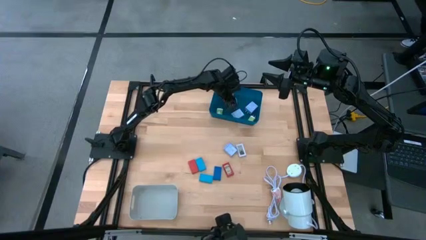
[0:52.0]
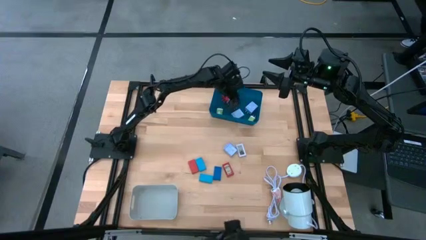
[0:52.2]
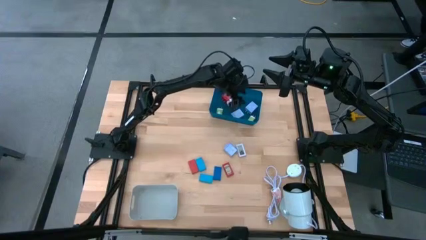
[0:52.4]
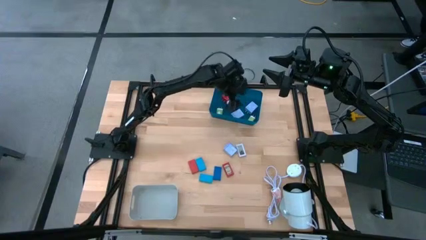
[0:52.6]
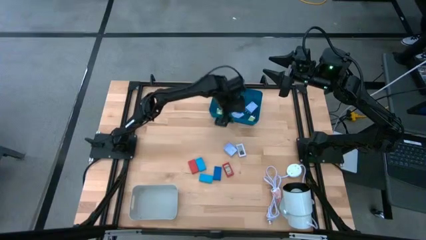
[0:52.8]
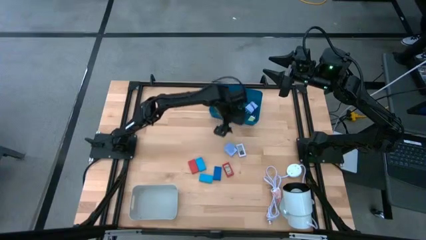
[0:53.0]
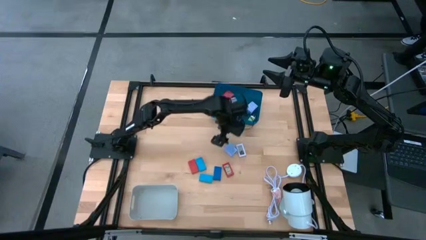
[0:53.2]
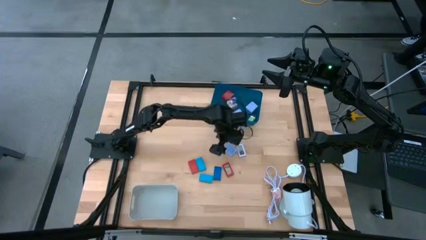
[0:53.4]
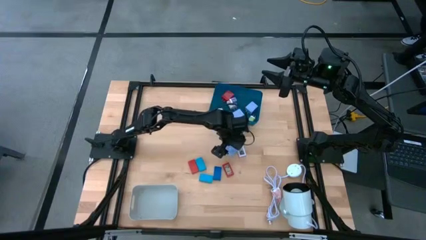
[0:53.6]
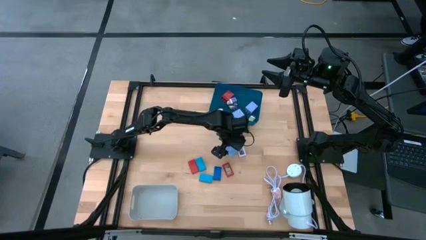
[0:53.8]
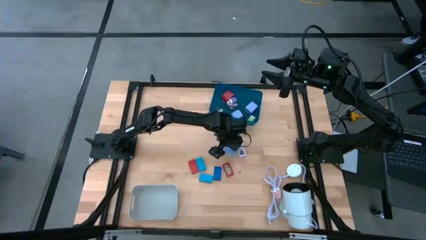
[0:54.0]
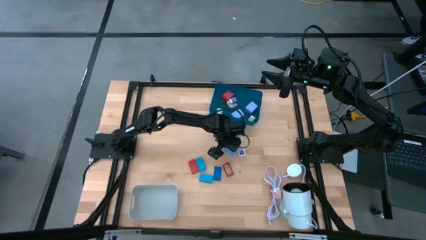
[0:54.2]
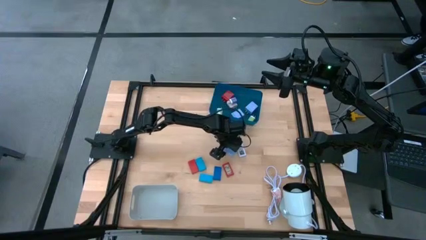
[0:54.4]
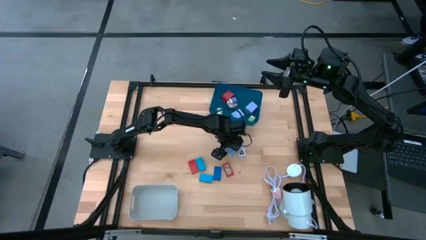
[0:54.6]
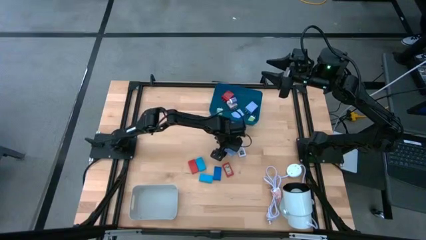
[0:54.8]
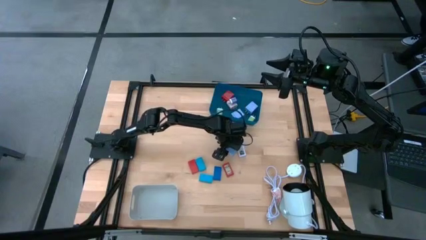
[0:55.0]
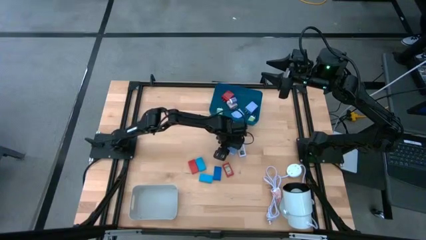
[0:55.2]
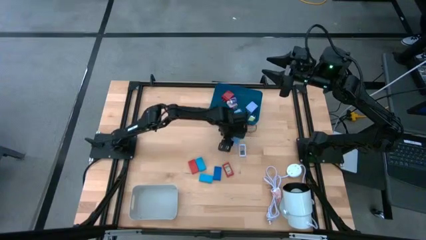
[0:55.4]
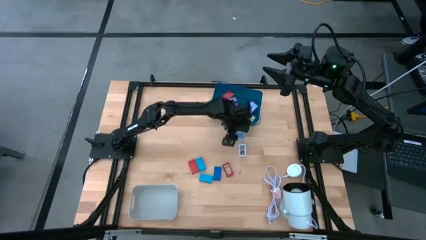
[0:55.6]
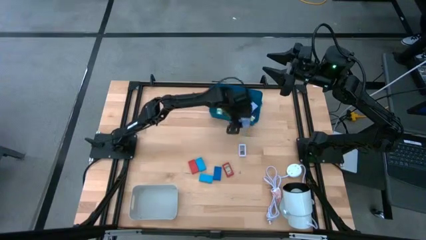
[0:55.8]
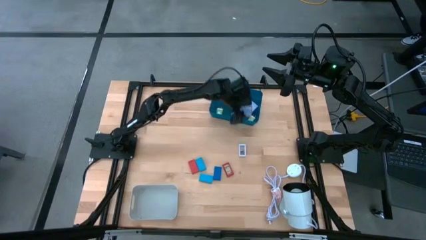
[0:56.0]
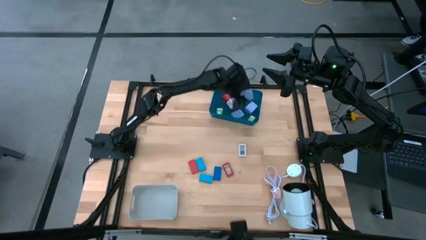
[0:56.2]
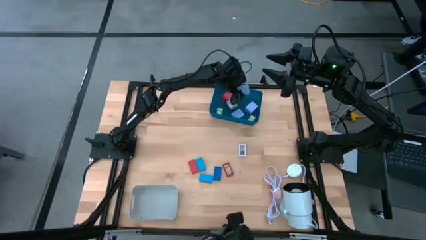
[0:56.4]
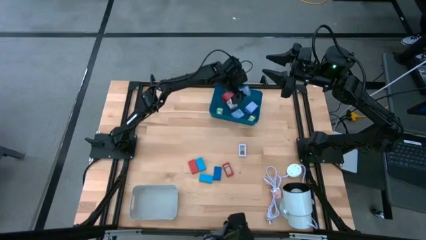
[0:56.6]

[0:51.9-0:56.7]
Task: Pick & Place Office items
Put the light blue charger adapter into the blue bin

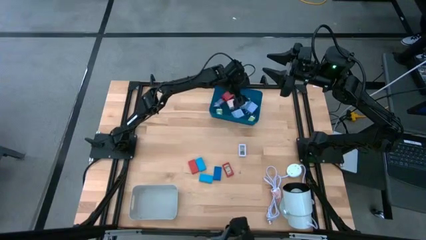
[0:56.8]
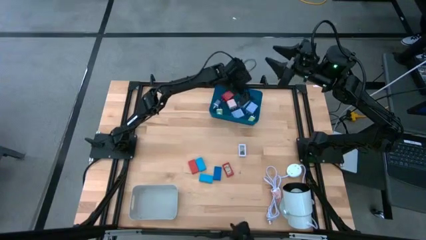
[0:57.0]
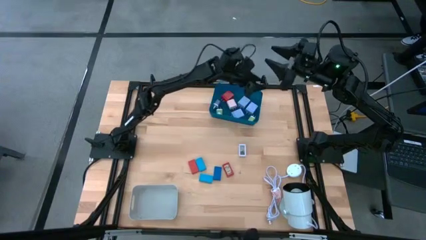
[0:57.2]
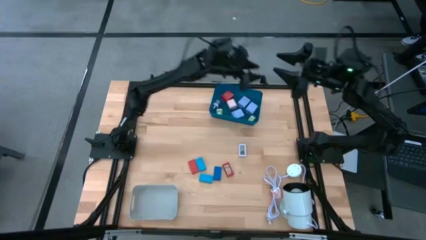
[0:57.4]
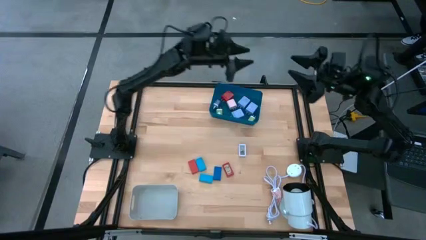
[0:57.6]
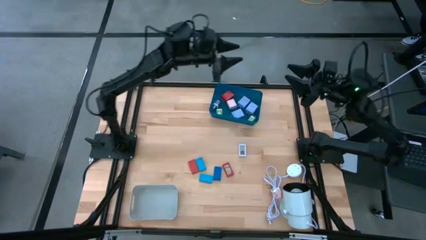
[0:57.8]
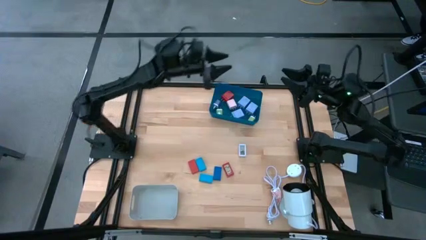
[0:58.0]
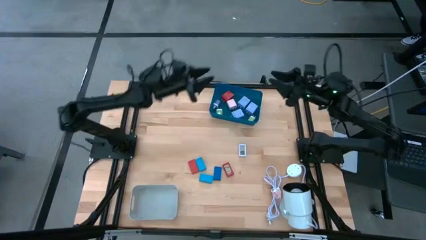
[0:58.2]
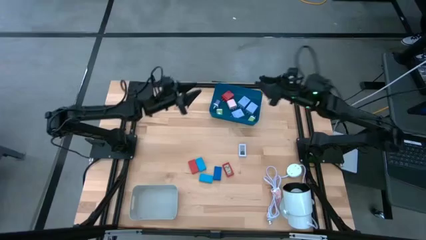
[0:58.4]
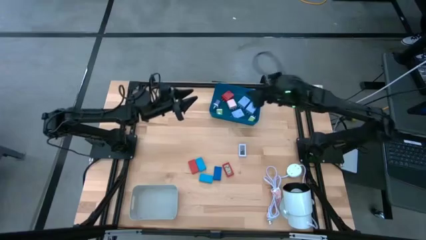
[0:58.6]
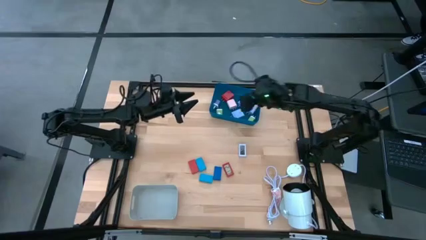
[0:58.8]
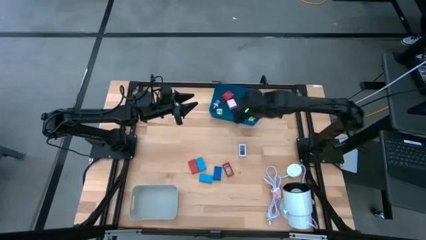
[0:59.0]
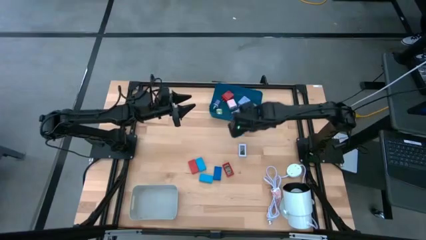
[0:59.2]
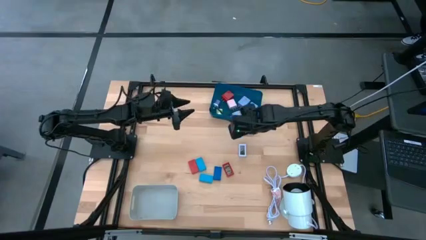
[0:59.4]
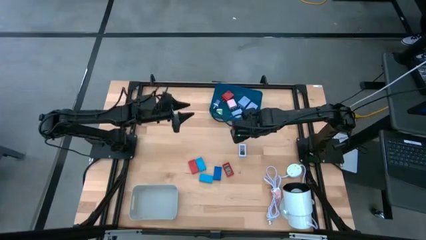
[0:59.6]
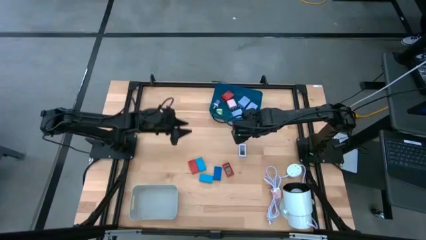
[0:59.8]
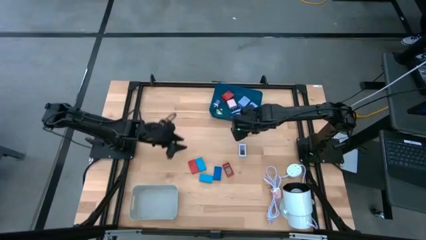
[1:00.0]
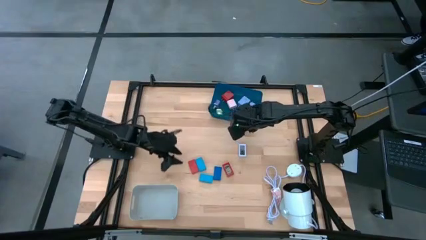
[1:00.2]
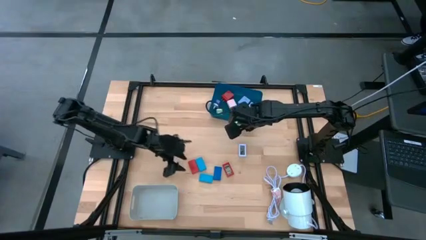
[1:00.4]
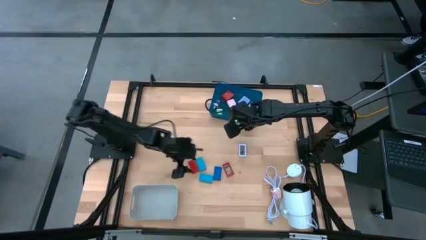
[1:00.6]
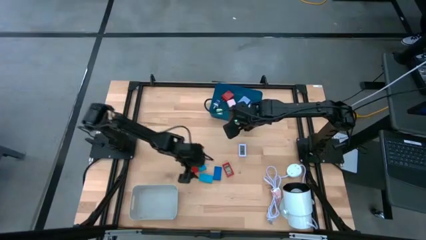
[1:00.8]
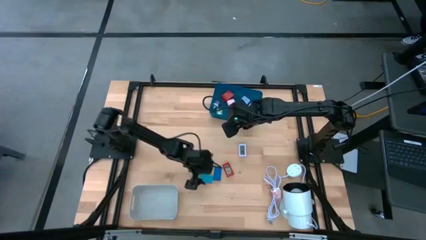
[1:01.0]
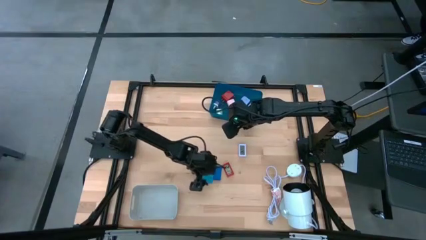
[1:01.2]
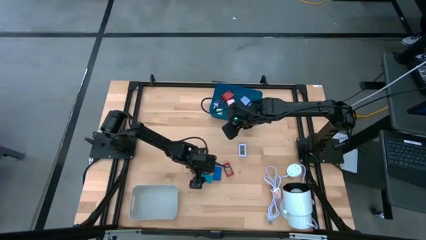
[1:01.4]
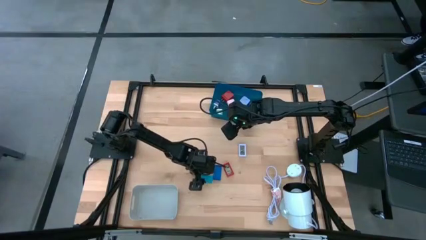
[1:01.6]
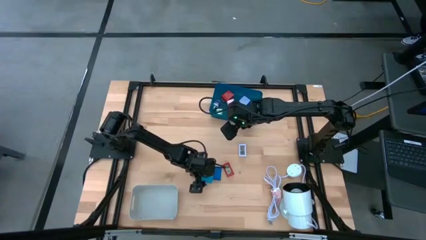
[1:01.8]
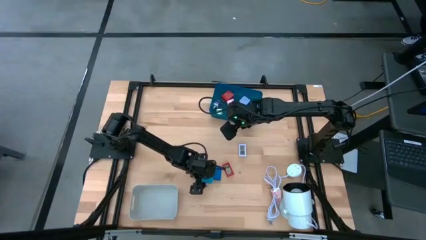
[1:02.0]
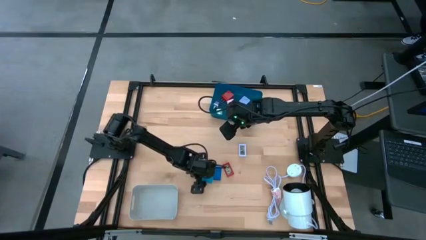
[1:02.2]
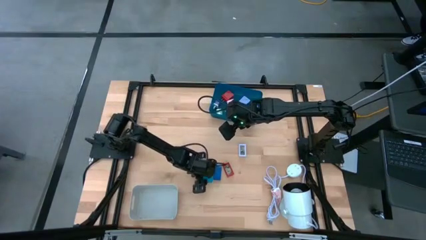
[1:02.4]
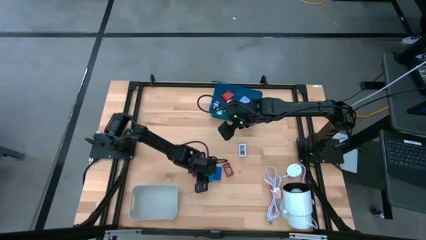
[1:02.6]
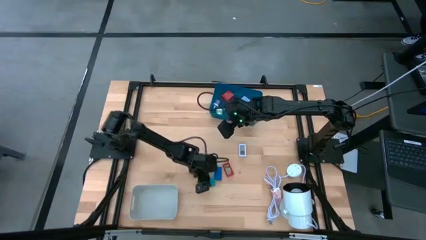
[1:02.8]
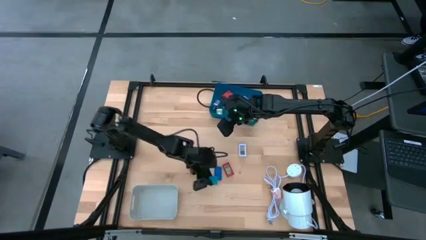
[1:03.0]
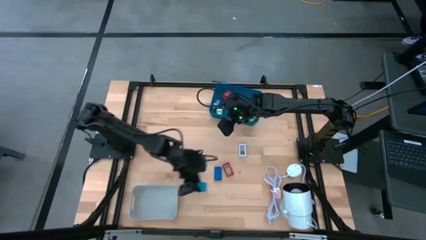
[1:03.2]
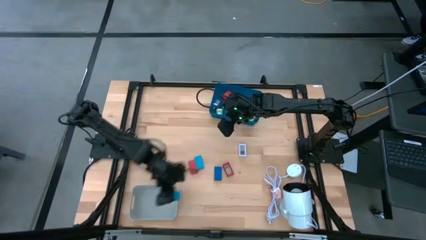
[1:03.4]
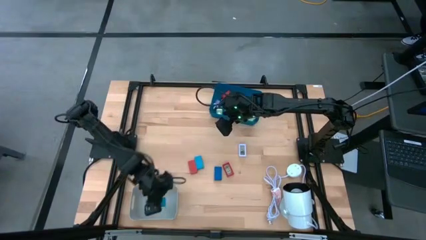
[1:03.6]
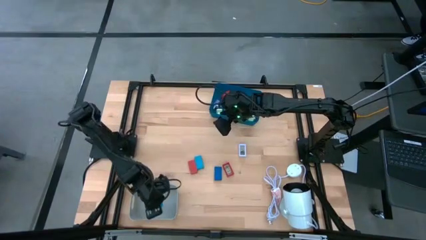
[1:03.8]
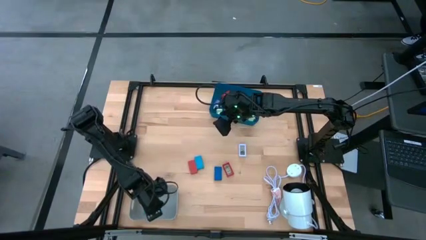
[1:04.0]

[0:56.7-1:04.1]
Put the bottom light blue digital timer into the white bin

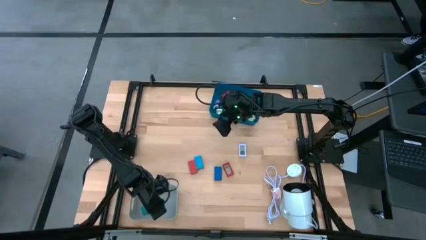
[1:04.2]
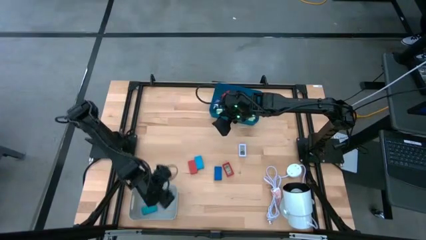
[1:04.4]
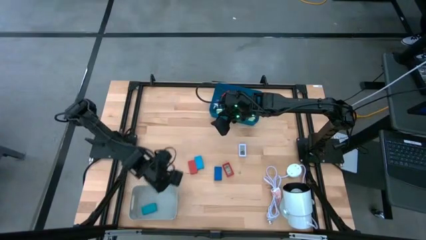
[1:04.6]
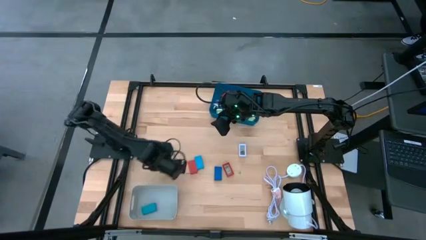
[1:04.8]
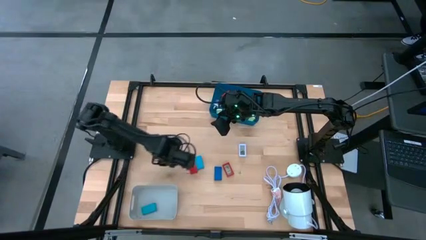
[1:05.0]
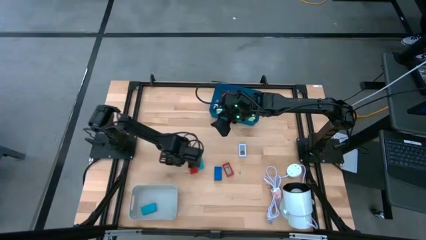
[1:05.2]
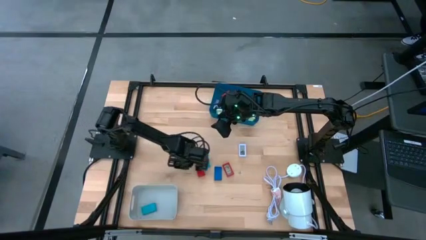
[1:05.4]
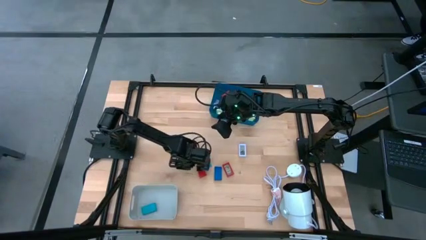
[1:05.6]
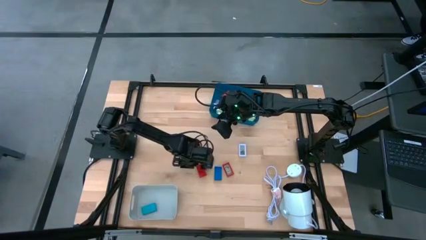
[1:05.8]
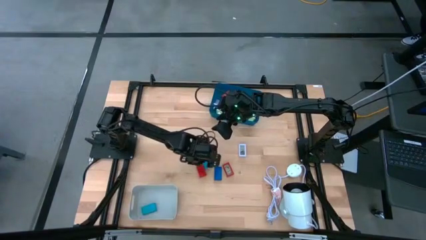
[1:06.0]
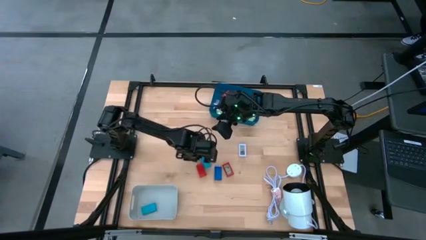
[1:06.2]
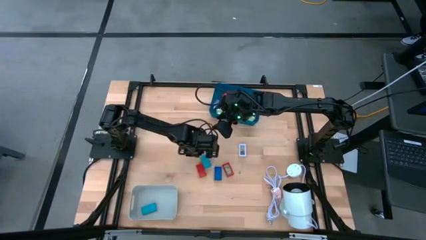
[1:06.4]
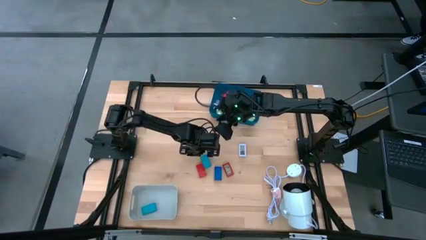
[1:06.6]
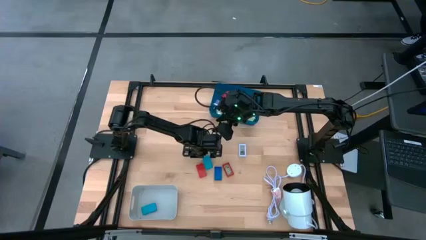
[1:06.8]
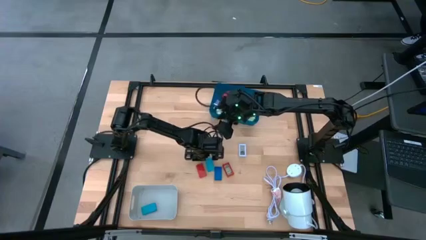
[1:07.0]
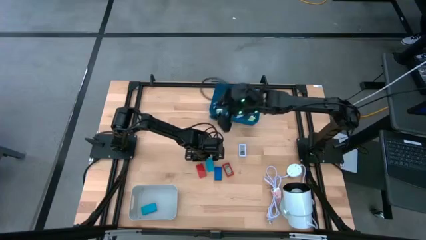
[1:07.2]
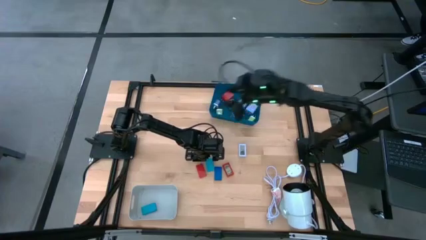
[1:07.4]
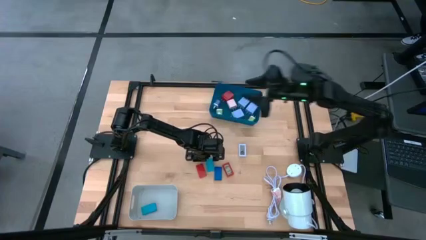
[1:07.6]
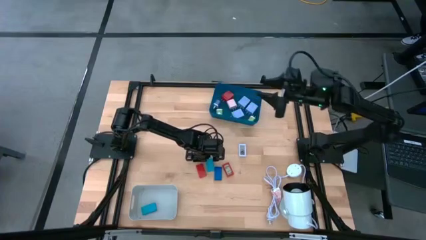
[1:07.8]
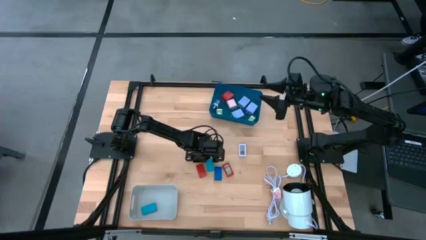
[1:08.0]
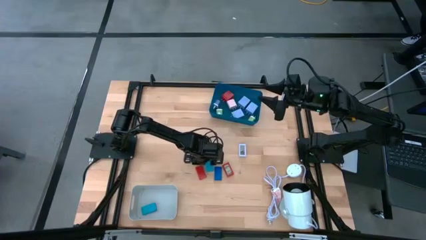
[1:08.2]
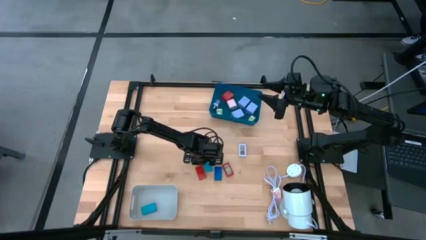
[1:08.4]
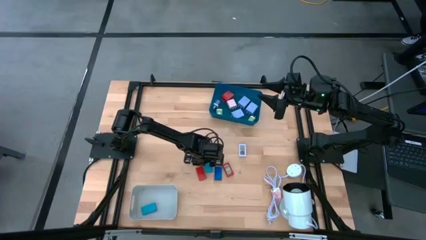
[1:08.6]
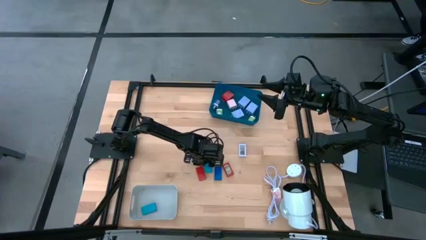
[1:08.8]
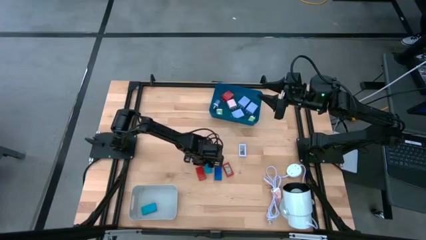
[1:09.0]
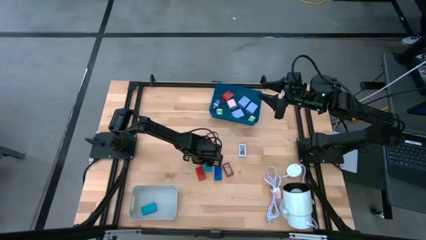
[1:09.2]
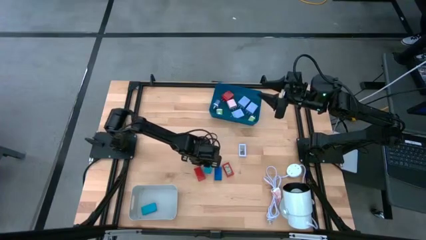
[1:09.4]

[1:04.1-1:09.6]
Put the light blue digital timer into the white bin
